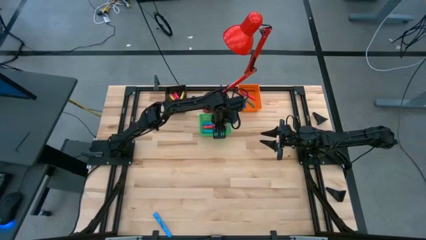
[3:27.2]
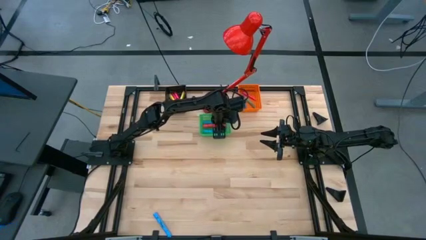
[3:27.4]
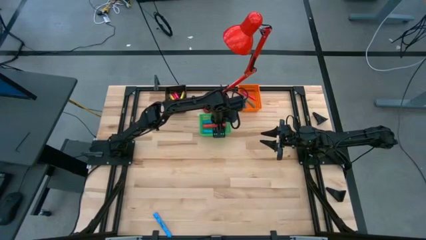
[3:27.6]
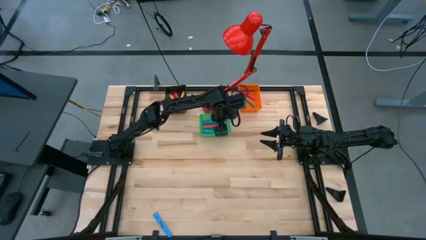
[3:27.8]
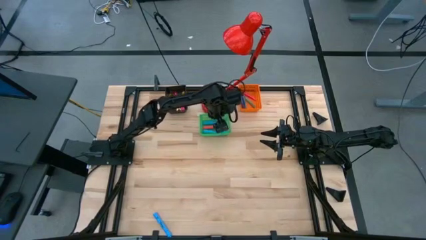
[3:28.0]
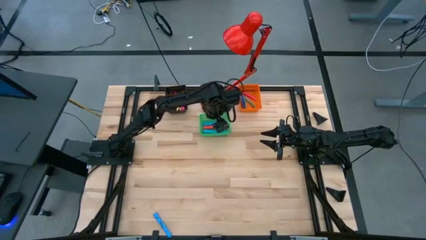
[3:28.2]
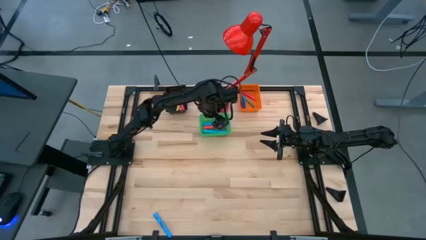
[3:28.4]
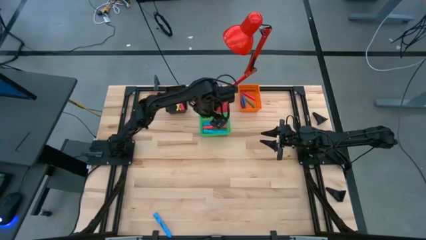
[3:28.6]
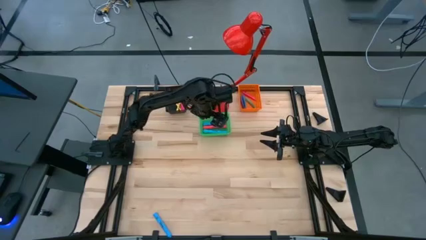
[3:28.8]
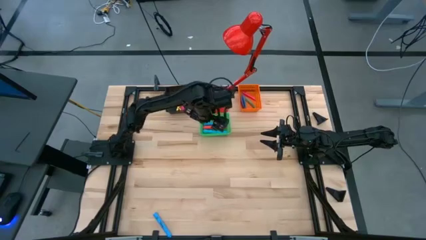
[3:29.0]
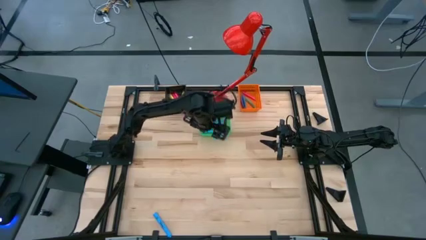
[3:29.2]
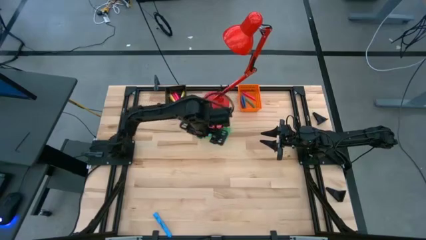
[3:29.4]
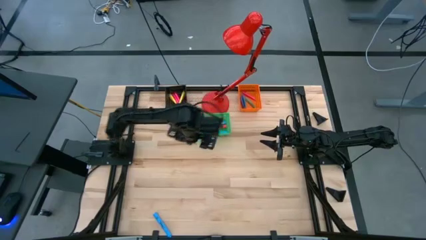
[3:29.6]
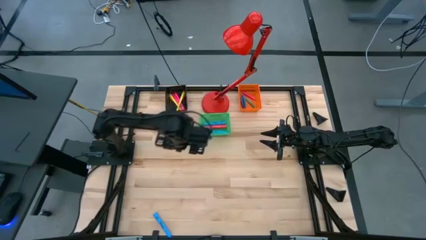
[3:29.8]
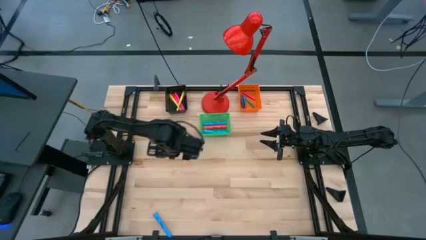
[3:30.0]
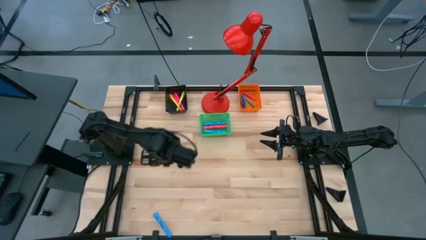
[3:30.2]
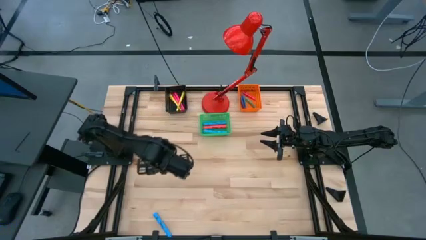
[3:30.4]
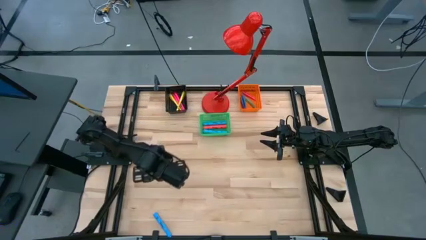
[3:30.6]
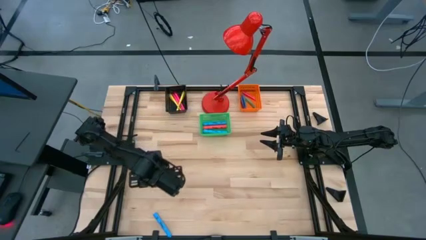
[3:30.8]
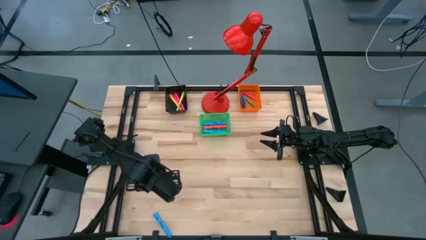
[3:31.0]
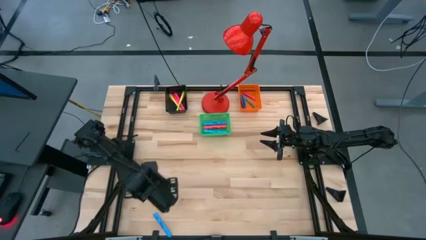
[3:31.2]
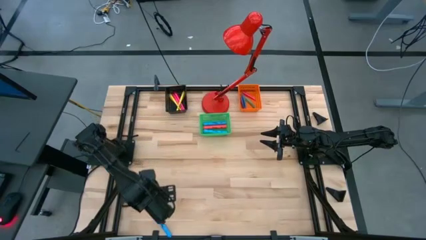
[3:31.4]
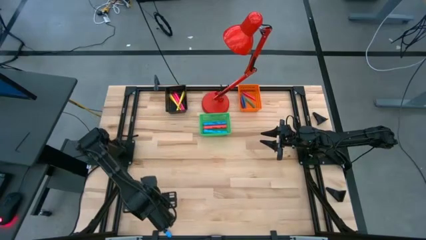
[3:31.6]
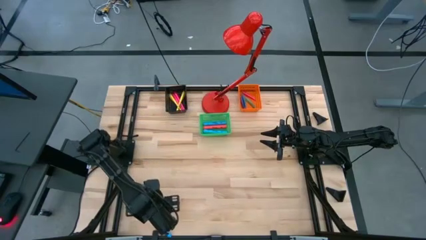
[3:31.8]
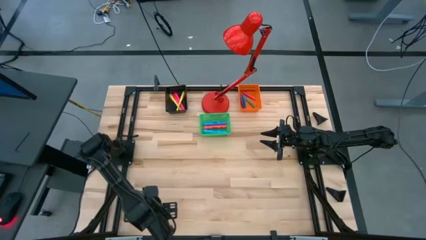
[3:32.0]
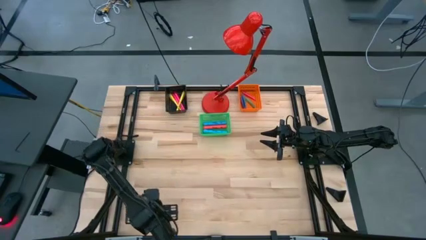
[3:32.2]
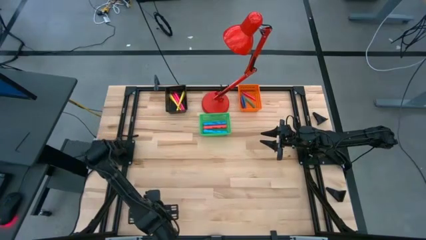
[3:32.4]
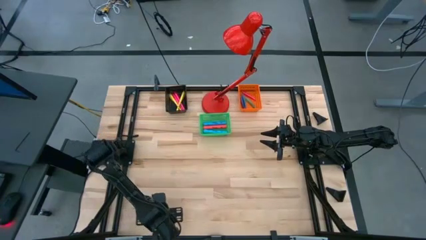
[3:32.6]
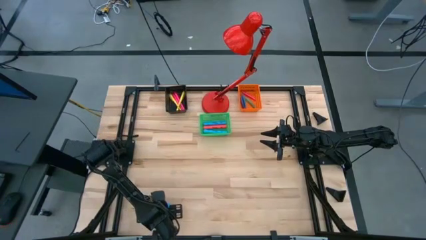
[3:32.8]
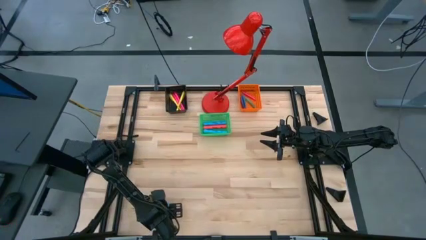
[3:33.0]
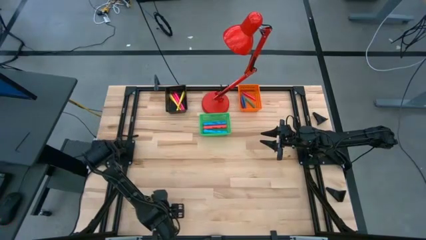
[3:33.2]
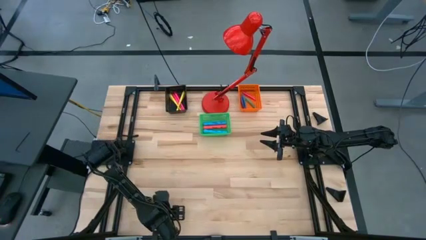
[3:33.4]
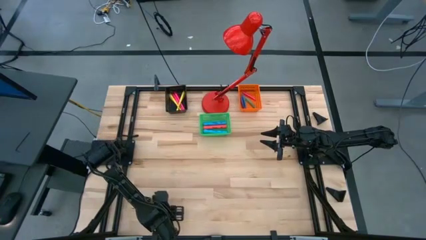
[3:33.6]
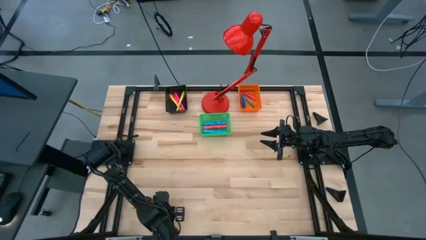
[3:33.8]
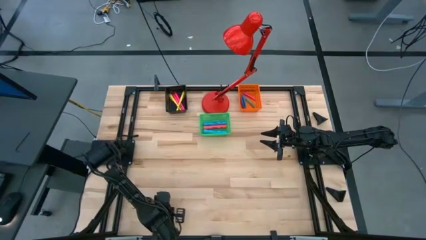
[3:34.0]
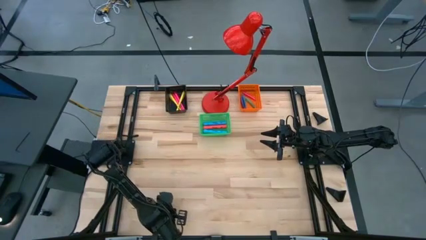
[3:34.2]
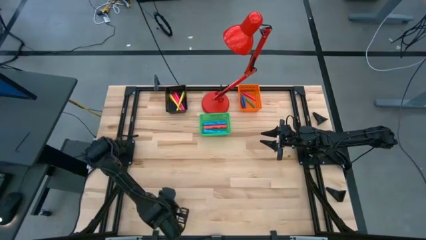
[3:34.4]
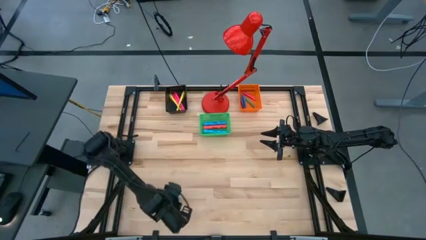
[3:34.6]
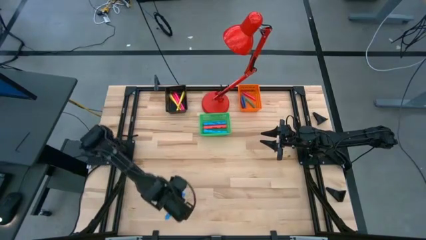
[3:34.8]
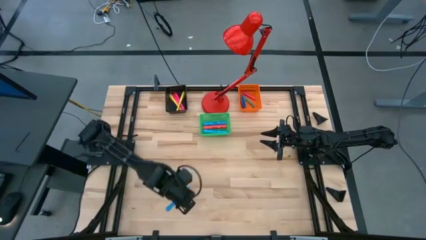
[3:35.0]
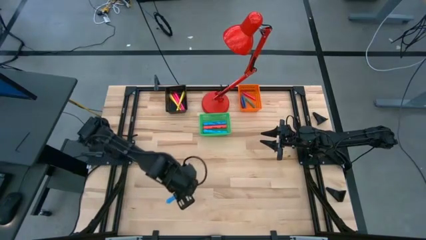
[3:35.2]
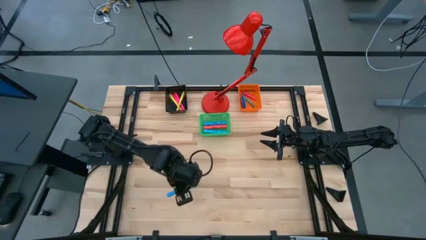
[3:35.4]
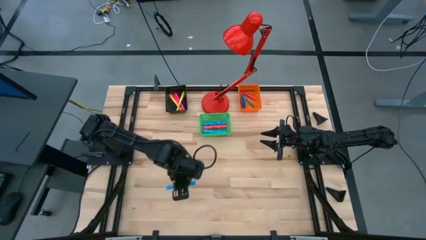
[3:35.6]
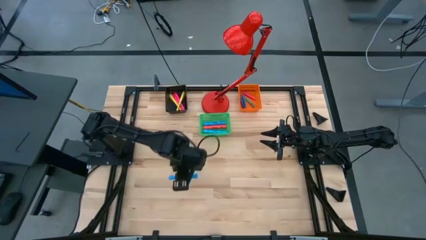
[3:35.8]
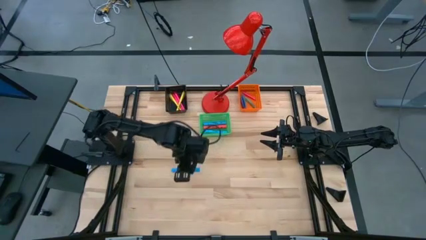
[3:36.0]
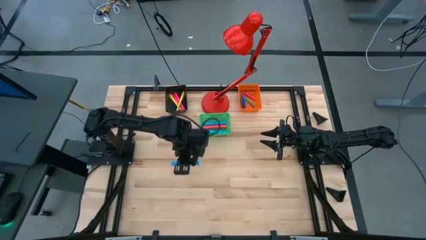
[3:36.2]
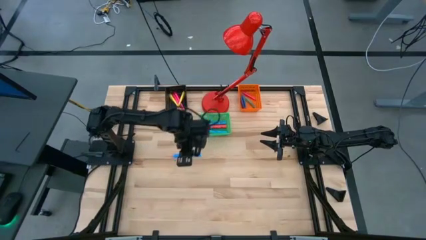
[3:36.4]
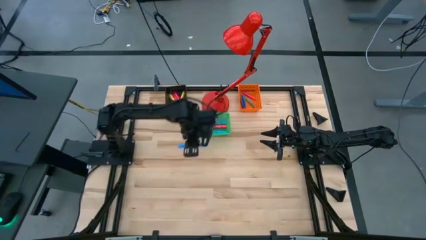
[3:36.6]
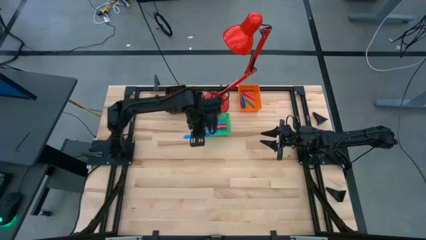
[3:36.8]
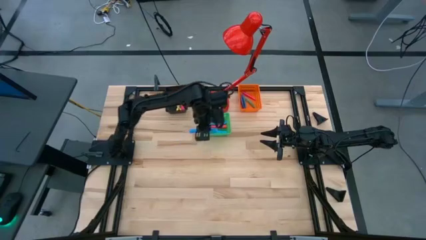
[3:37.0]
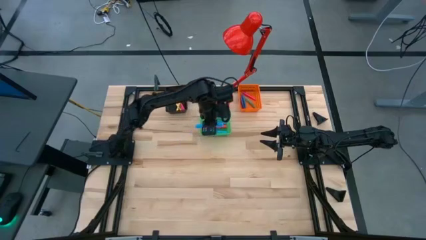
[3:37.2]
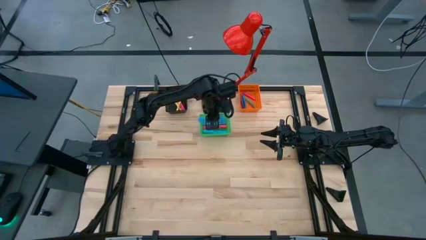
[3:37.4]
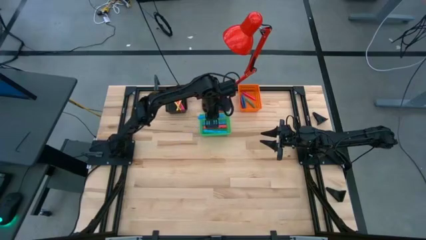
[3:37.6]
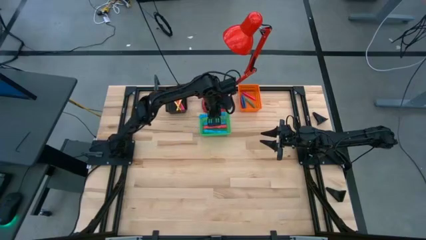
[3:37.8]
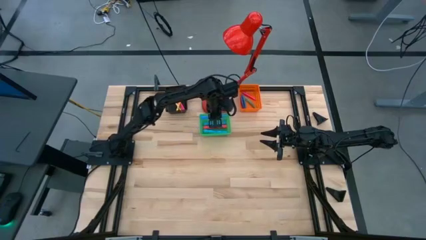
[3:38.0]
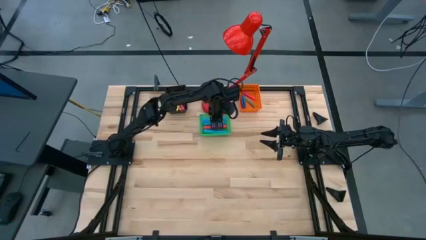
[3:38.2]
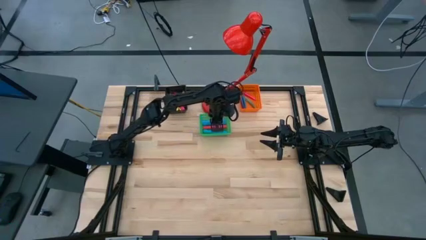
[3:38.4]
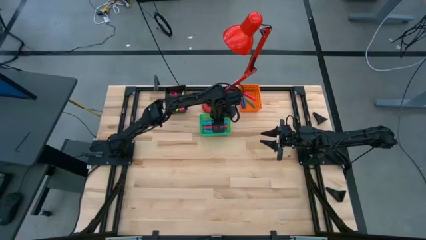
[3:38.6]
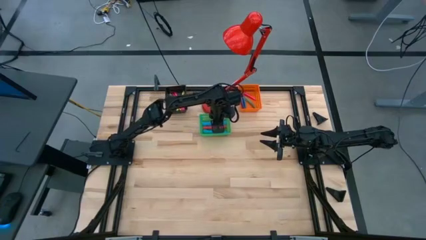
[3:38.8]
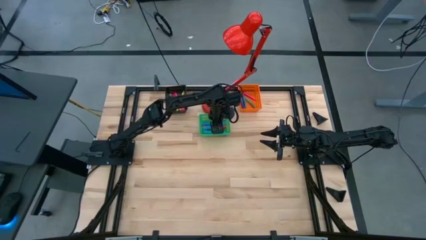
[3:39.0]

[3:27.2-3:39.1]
Task: Pick & Place Markers
Put the big blue highlighter into the green basket

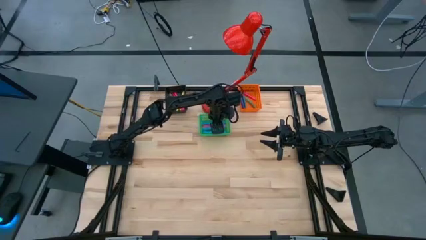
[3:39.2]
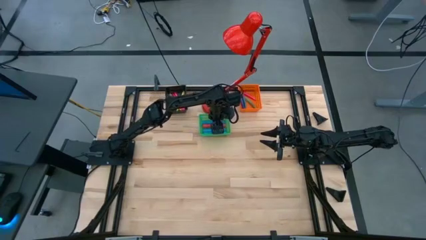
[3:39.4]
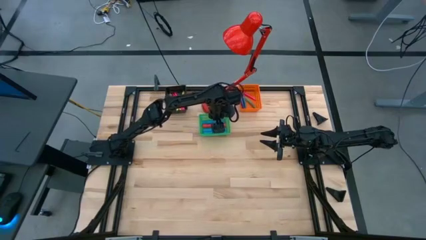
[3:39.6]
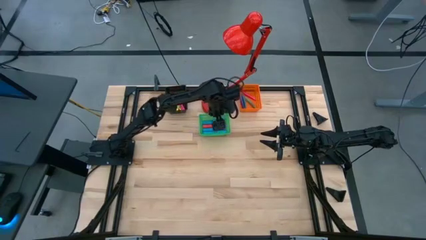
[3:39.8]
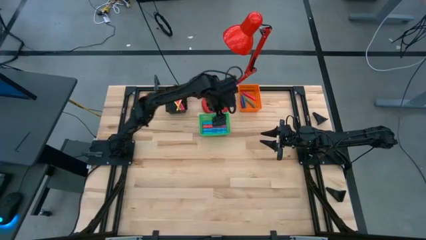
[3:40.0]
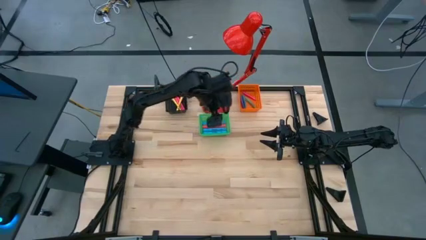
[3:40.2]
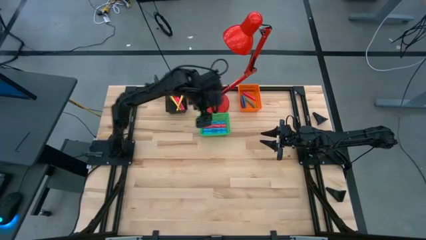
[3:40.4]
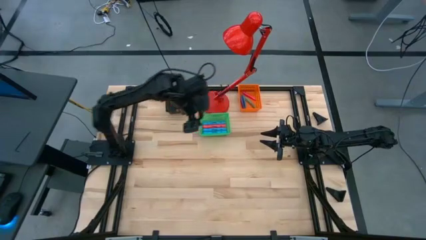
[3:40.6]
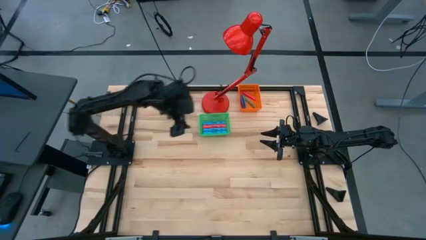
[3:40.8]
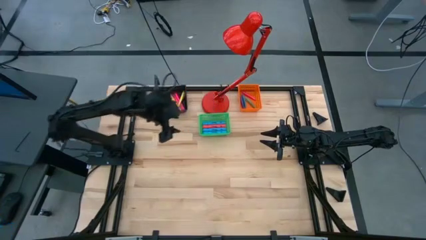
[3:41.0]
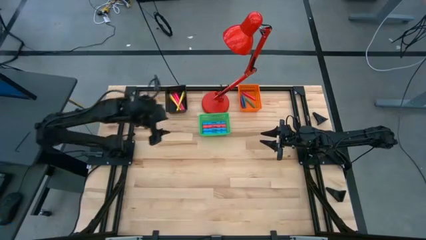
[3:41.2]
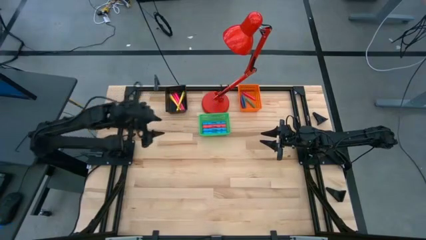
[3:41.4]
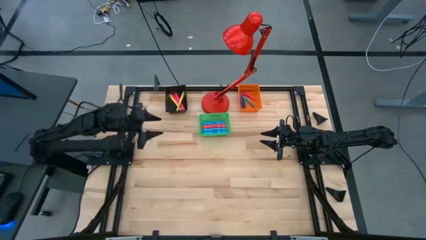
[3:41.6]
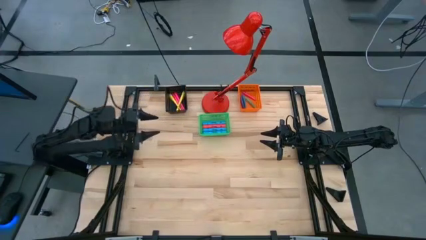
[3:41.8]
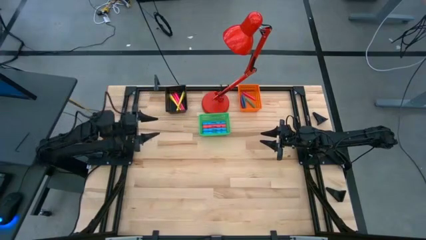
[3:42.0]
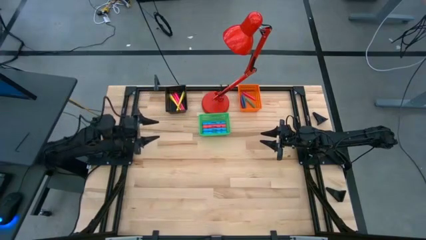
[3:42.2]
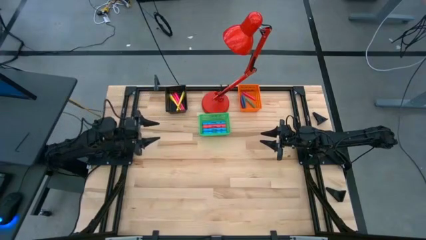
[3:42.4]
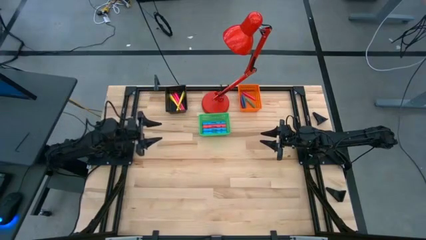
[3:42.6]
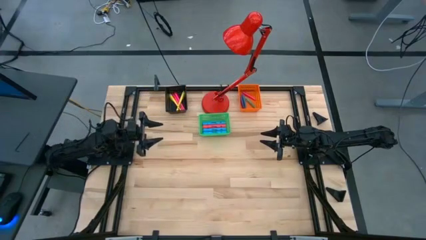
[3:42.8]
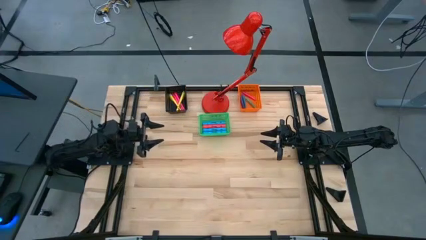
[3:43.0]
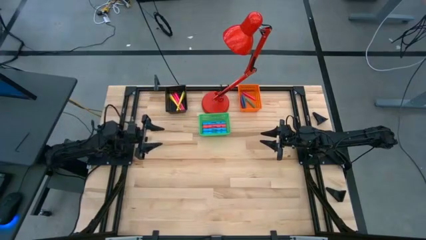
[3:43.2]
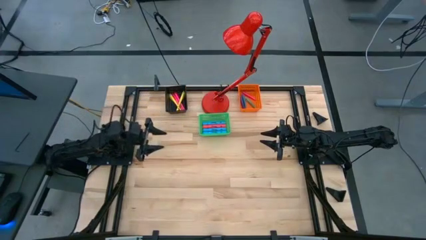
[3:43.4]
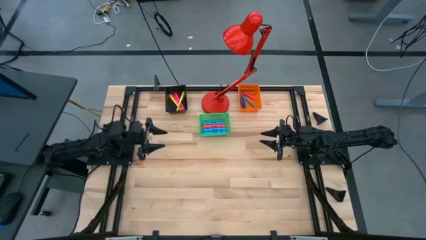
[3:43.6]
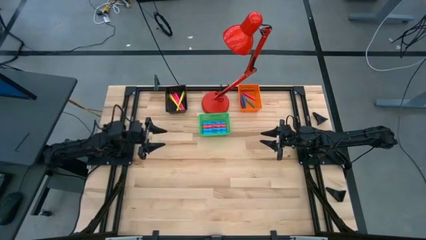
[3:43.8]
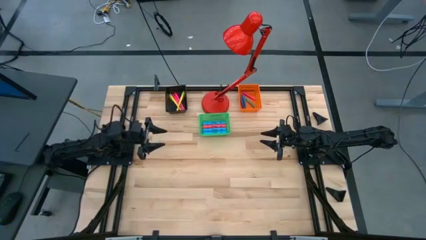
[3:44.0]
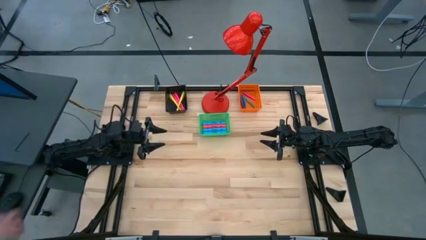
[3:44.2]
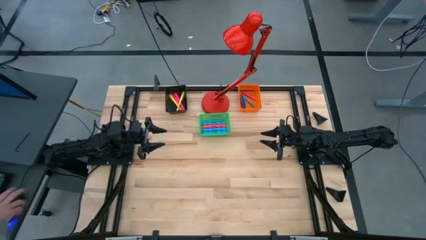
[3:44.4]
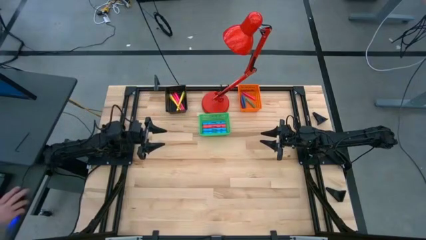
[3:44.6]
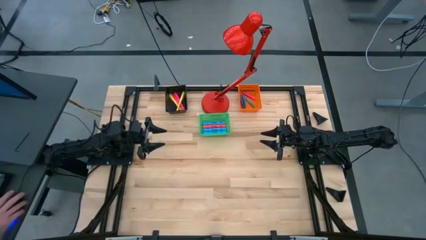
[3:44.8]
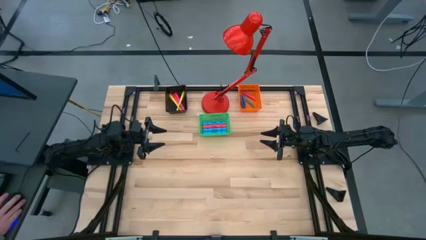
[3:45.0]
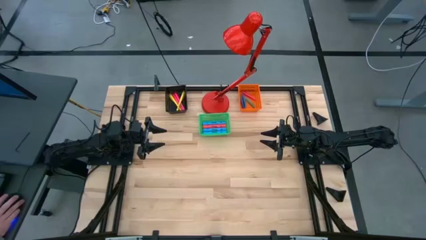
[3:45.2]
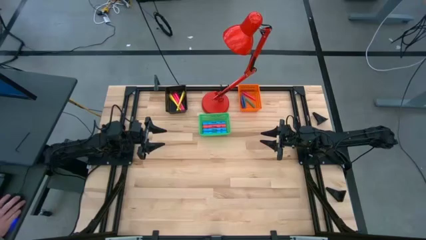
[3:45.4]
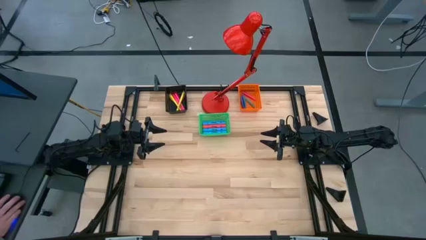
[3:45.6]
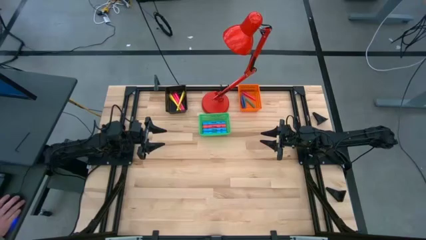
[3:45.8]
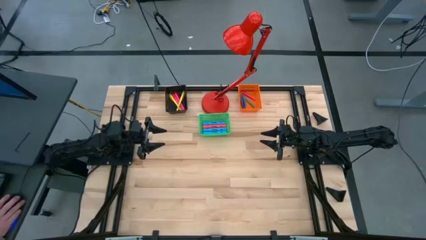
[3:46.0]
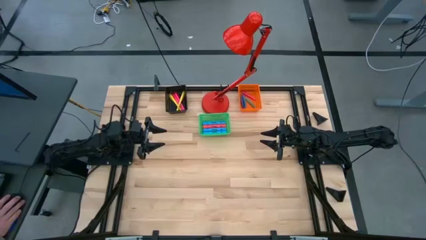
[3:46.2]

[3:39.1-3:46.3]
Return to Home Position
